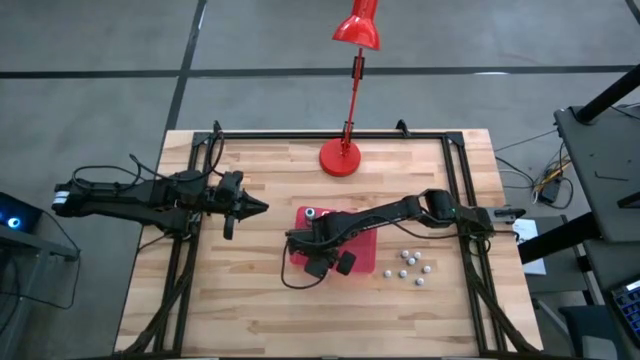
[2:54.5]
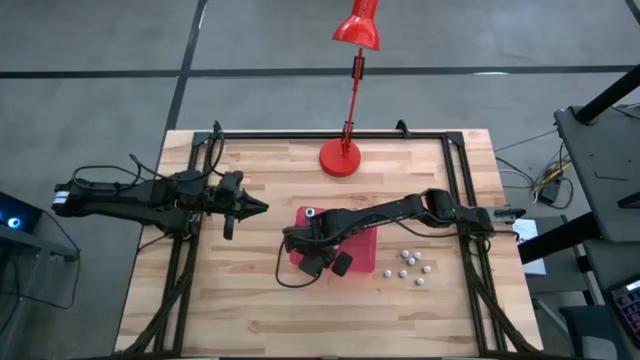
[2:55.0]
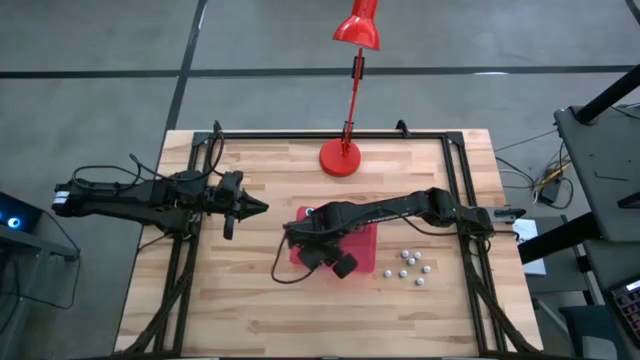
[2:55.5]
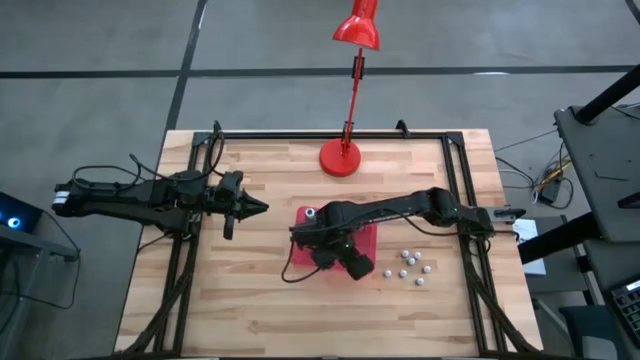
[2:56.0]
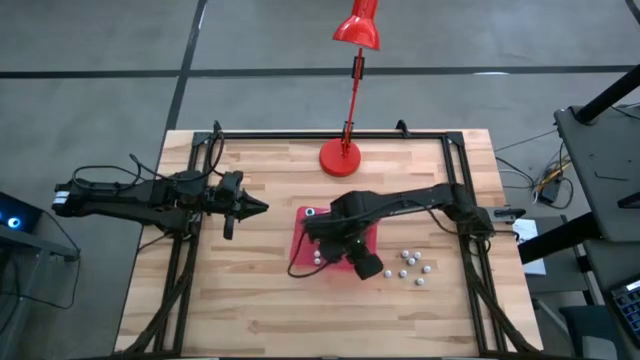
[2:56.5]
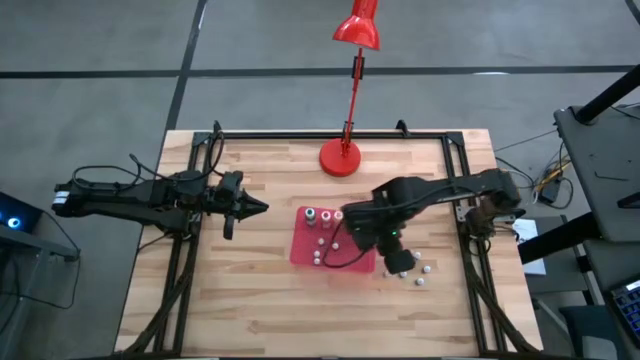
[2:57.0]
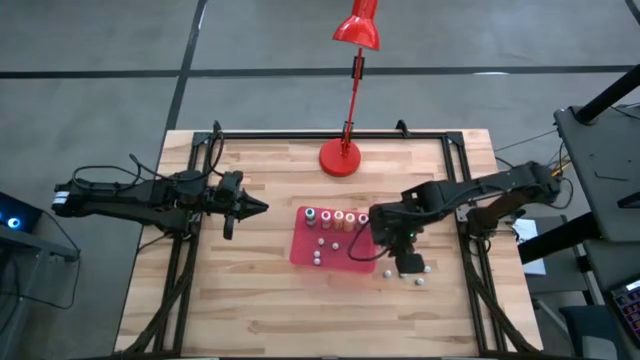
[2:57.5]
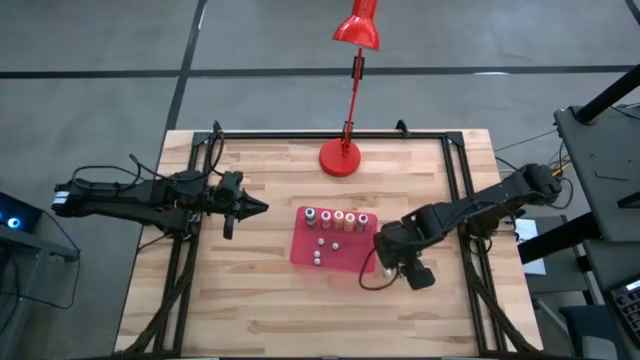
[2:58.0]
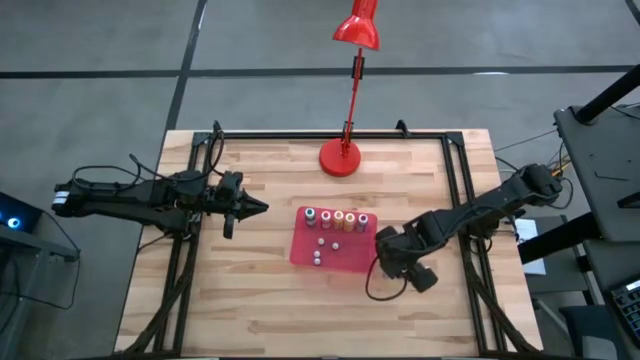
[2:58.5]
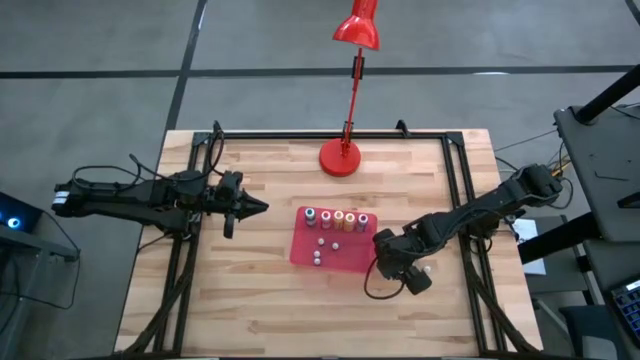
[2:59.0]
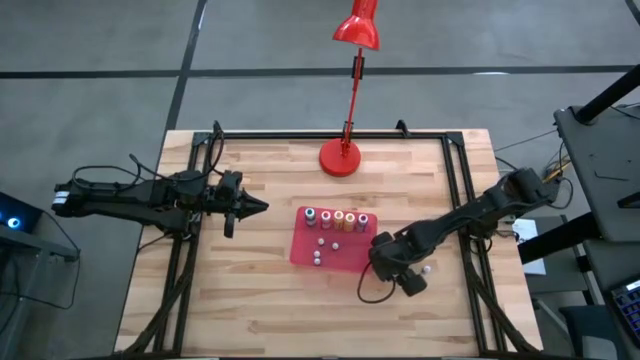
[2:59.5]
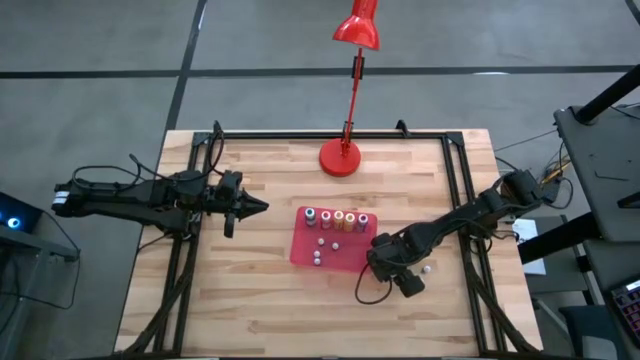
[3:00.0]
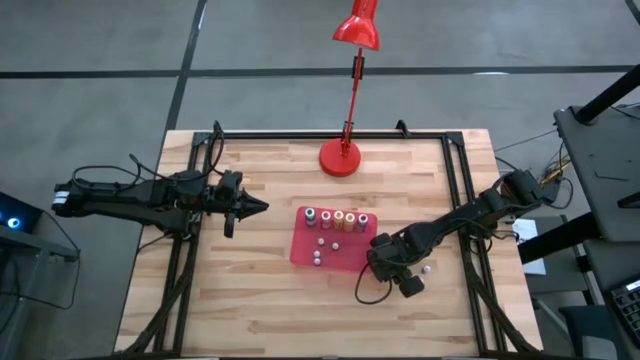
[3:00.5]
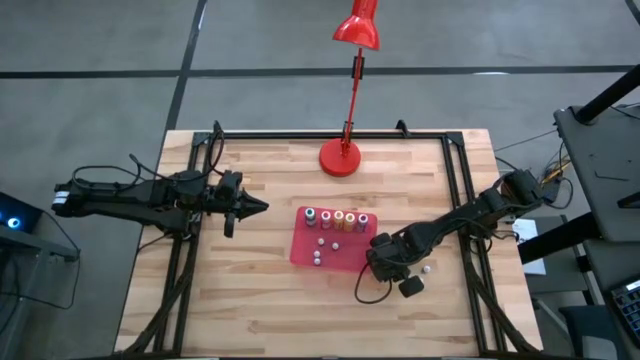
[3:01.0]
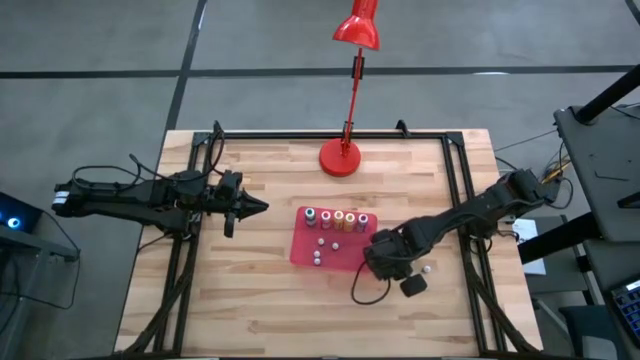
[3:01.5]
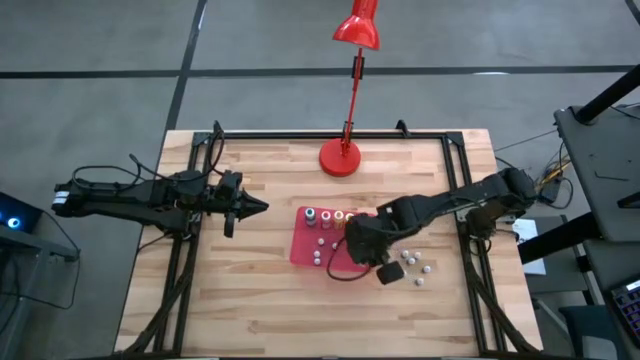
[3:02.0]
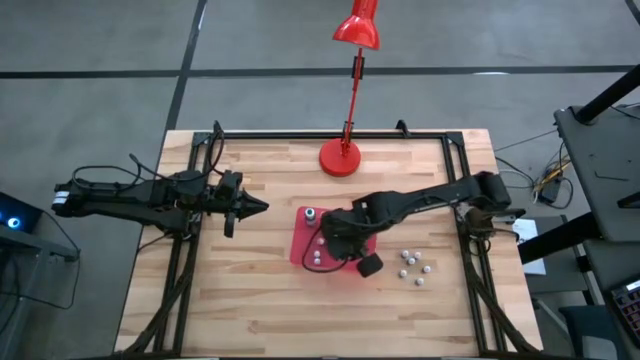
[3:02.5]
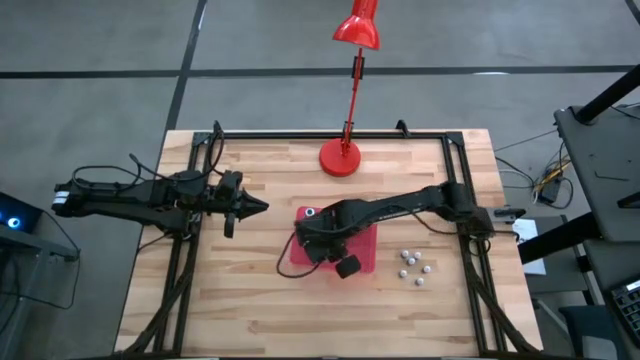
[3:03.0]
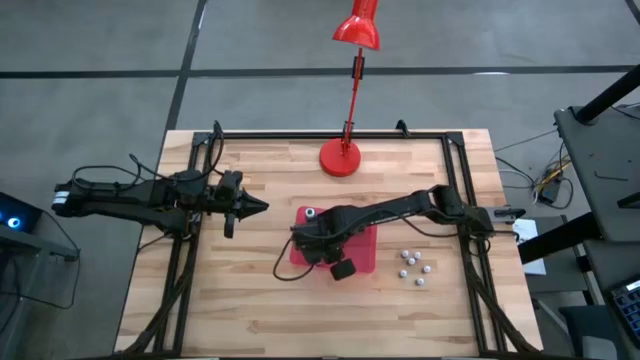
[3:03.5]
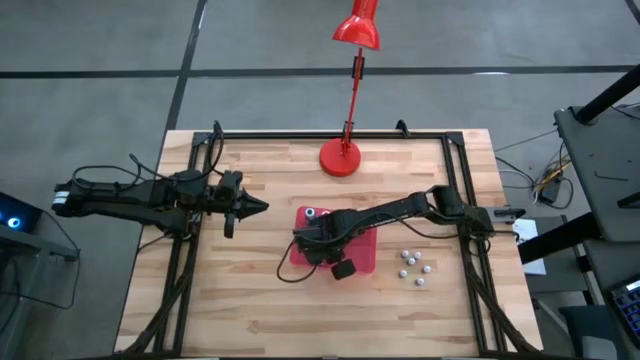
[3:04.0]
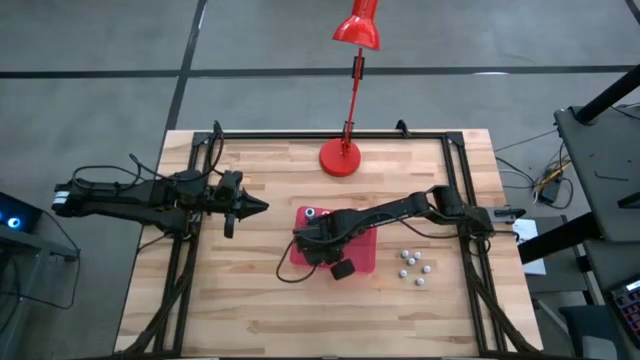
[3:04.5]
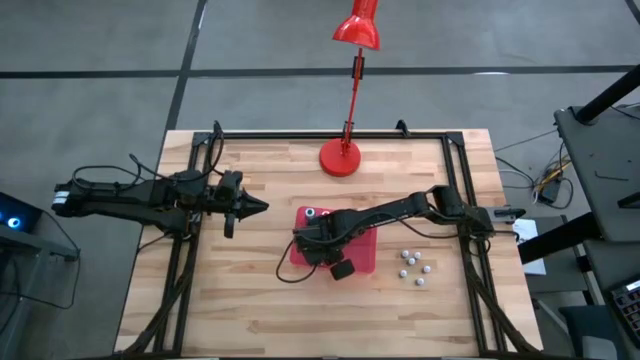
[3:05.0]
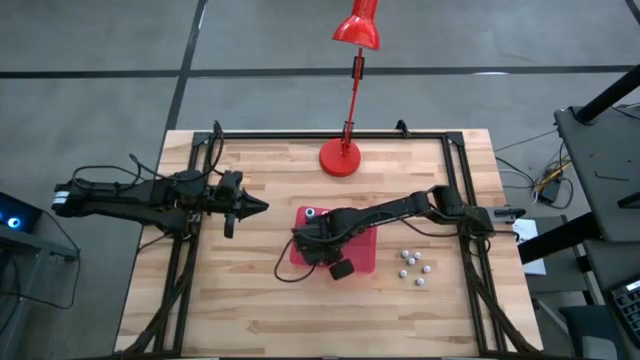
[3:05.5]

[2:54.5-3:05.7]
Task: Pick & Place food coloring
Put the small green food coloring bottle into the red bin

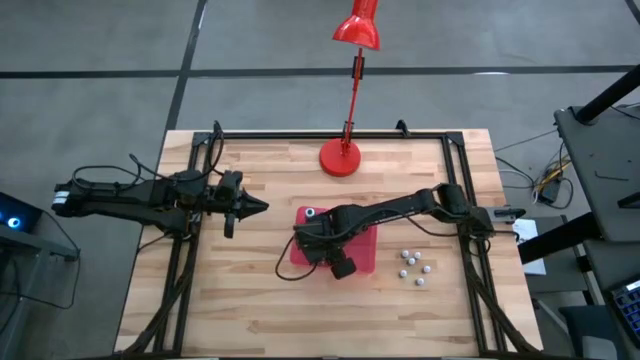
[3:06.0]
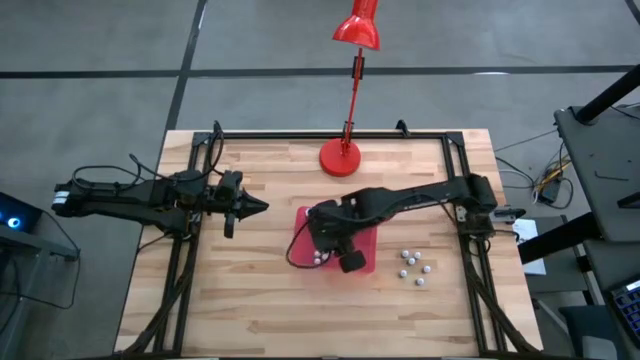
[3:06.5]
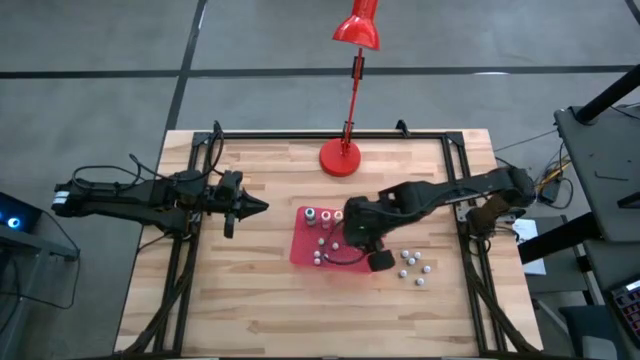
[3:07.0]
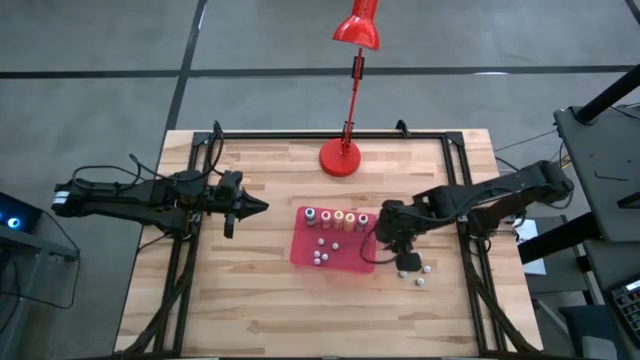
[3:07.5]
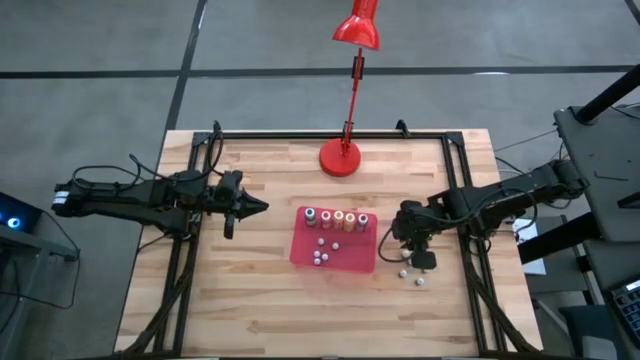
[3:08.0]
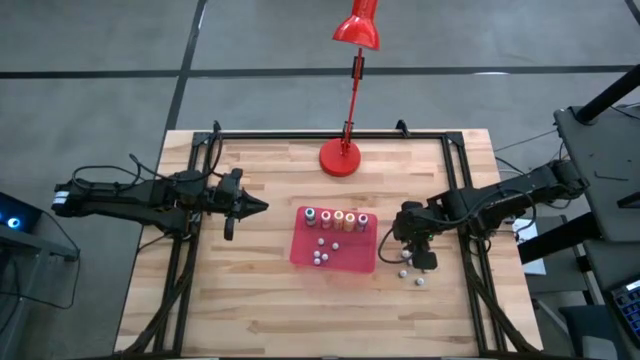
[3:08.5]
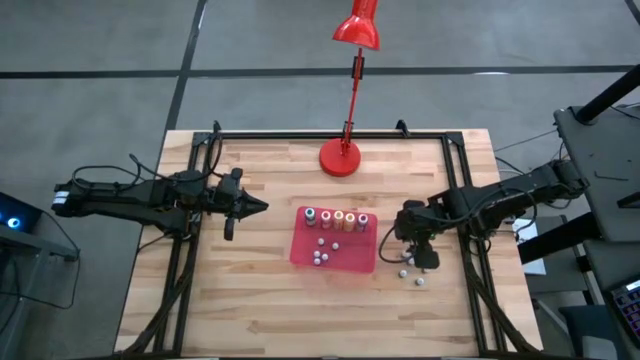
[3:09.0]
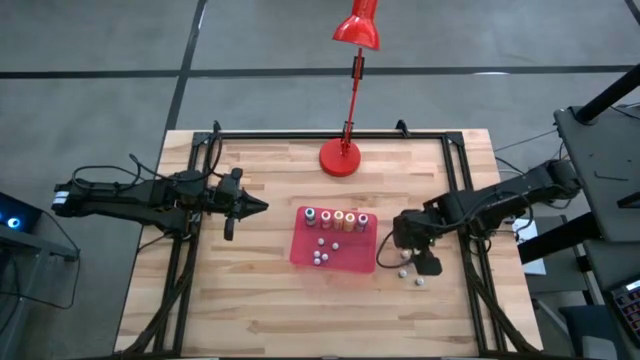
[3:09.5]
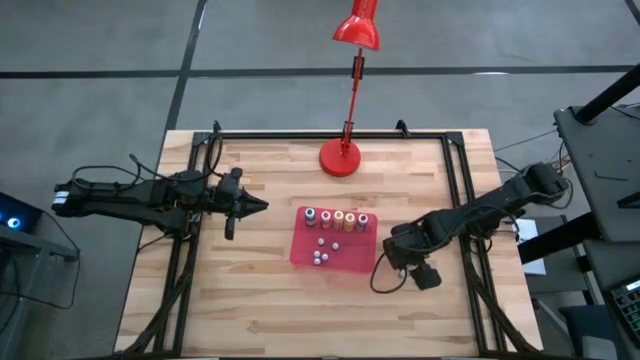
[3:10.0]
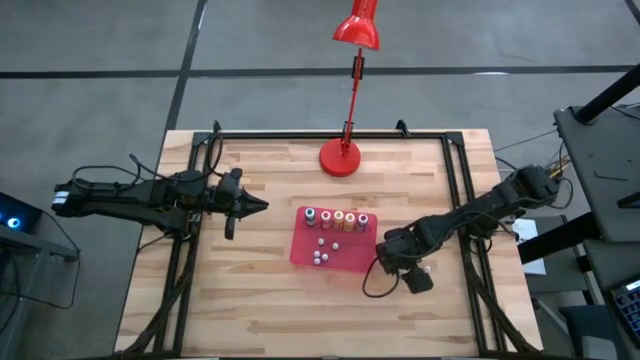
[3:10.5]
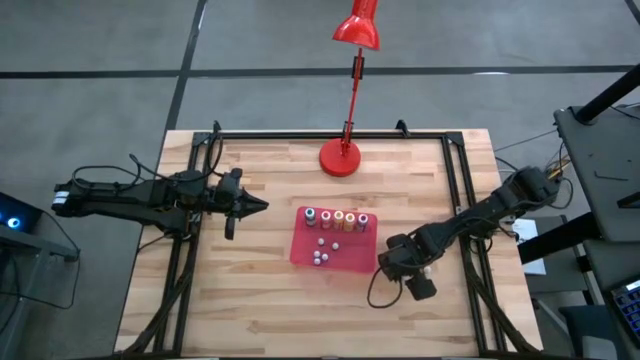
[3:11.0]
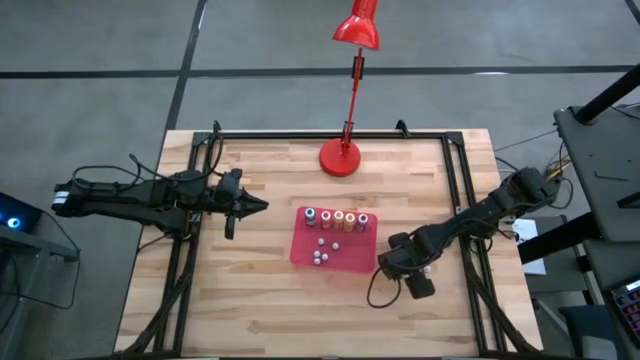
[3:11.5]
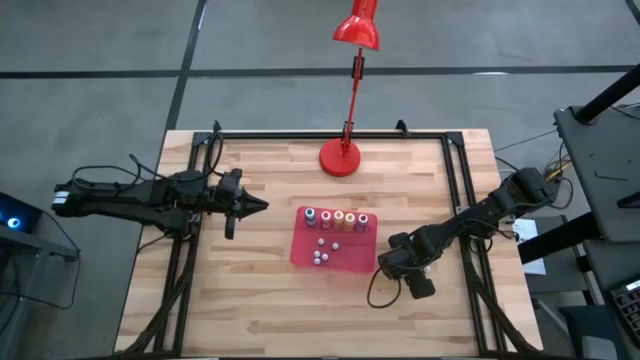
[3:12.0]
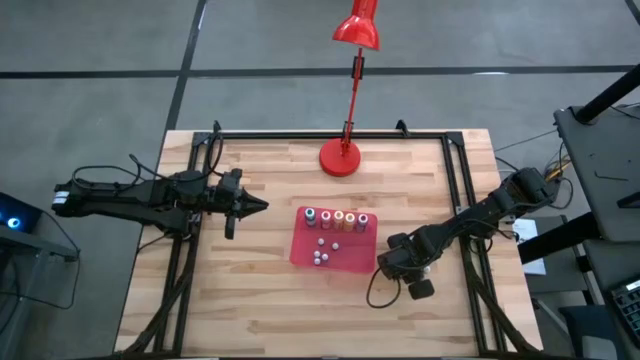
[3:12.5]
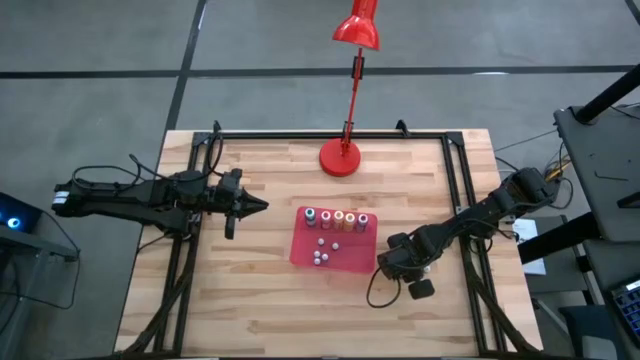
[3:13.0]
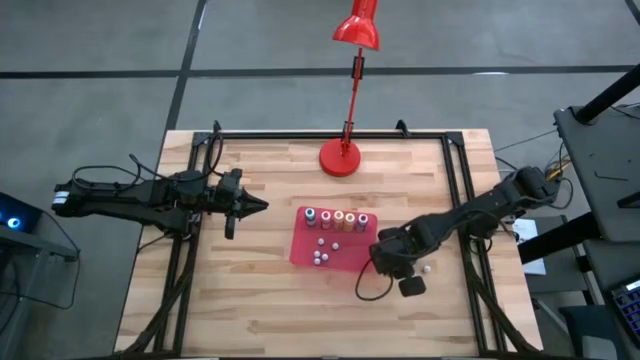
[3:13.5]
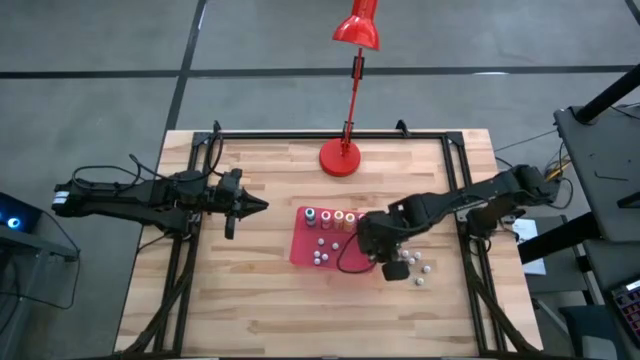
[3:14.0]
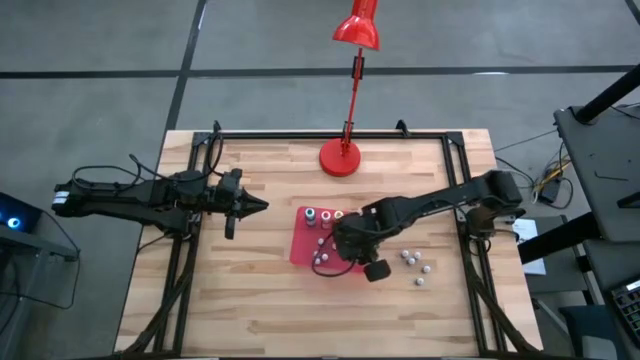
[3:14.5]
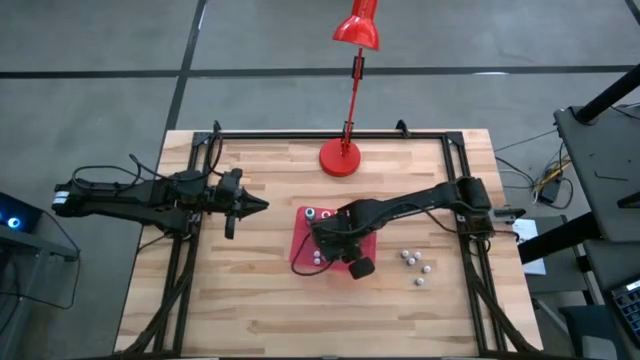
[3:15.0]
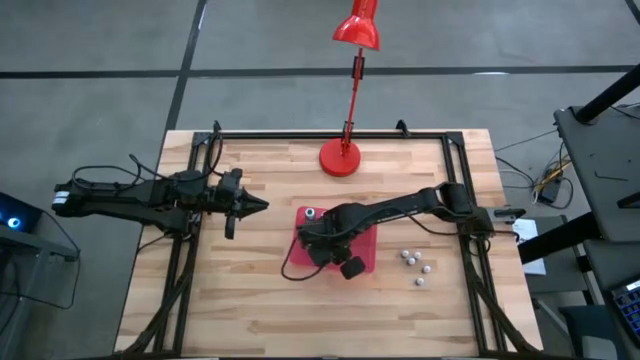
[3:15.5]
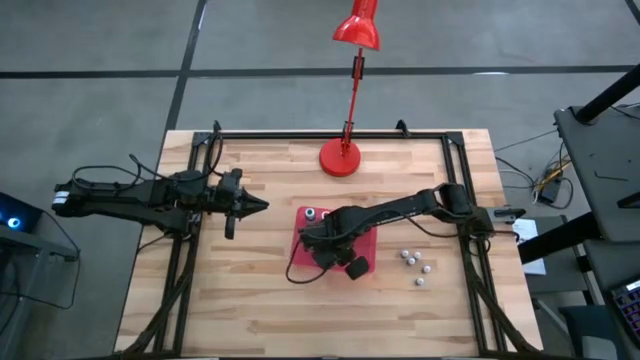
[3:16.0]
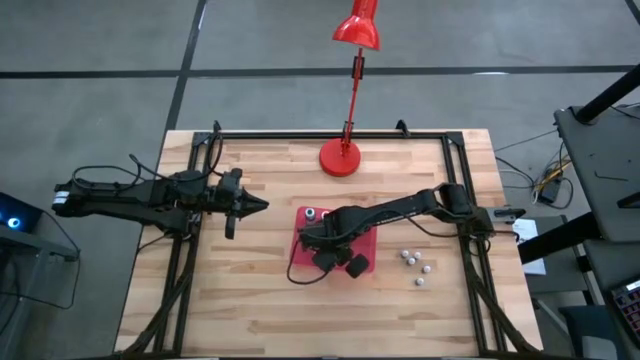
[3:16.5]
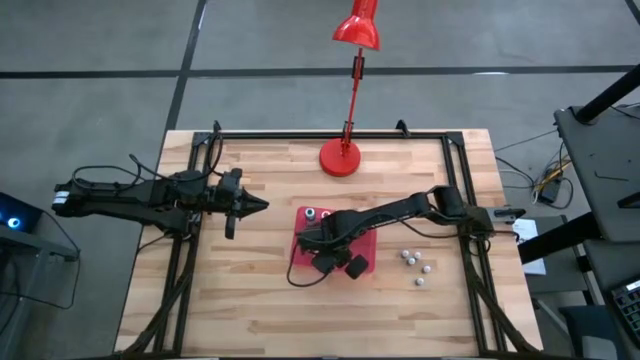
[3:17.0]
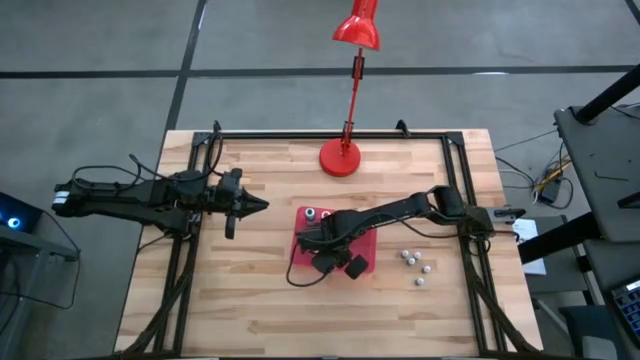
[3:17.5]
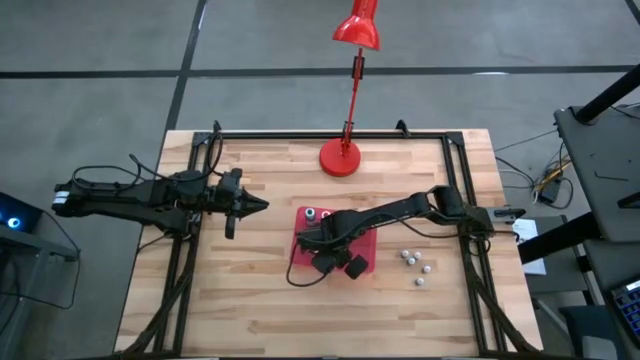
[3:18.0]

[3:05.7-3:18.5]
Put the small black food coloring bottle into the red bin
